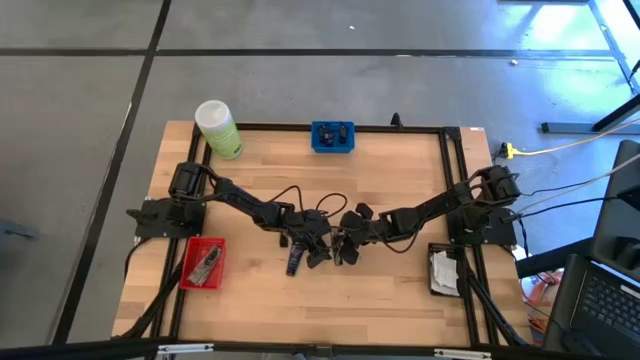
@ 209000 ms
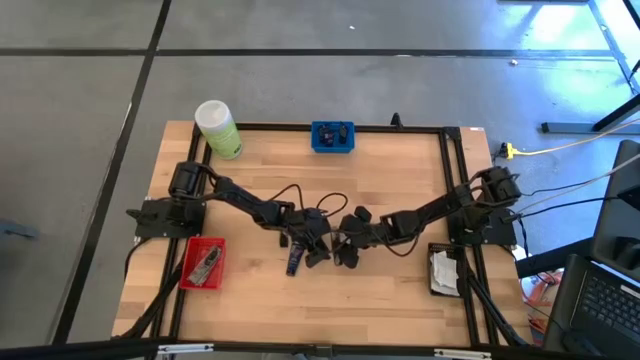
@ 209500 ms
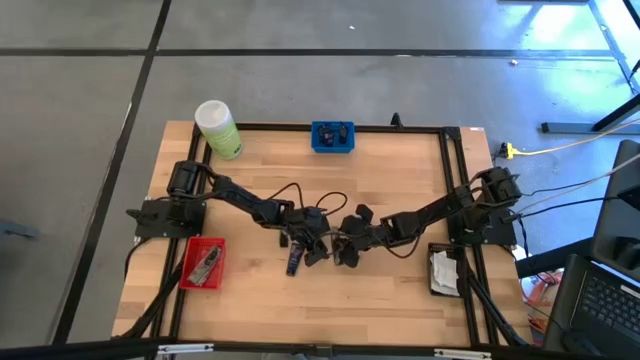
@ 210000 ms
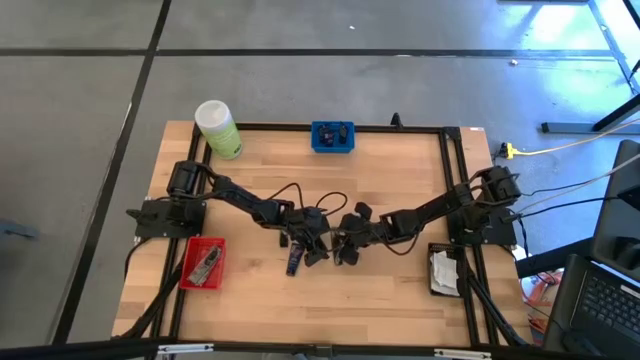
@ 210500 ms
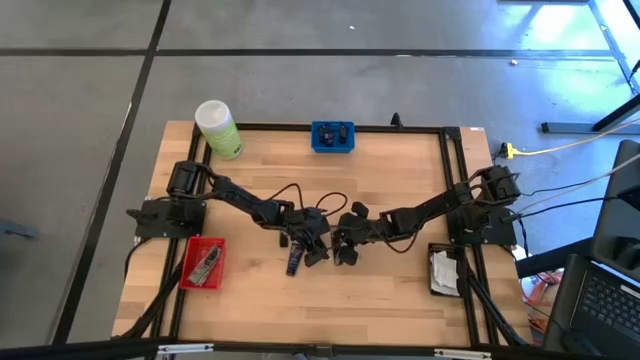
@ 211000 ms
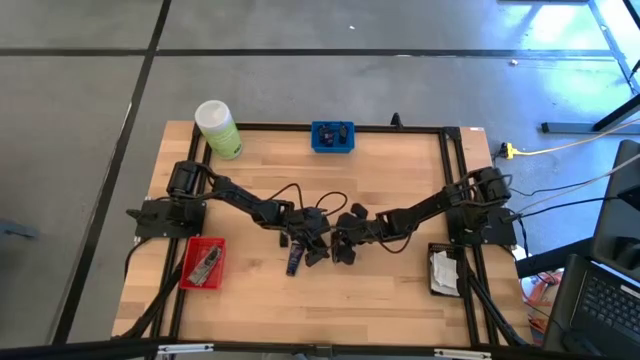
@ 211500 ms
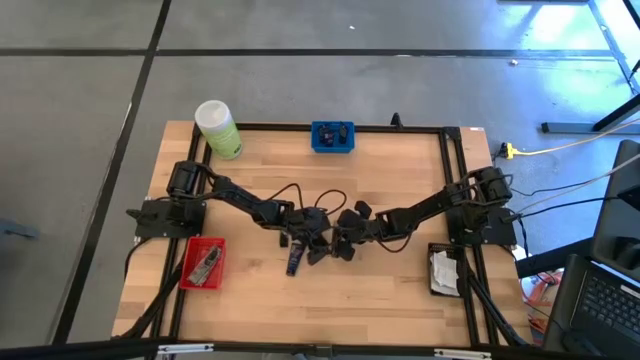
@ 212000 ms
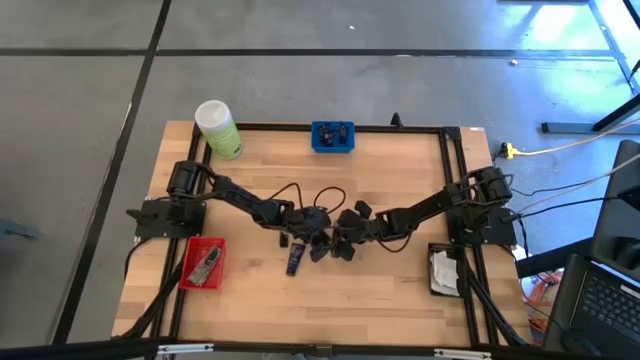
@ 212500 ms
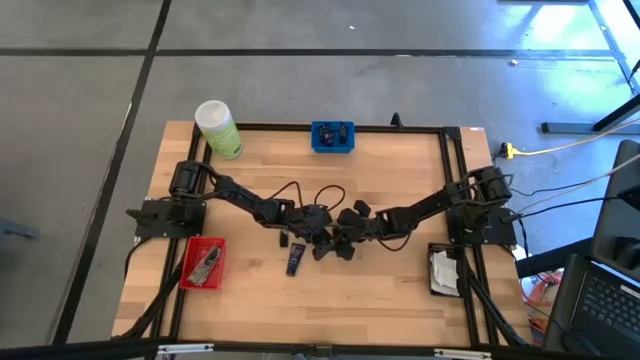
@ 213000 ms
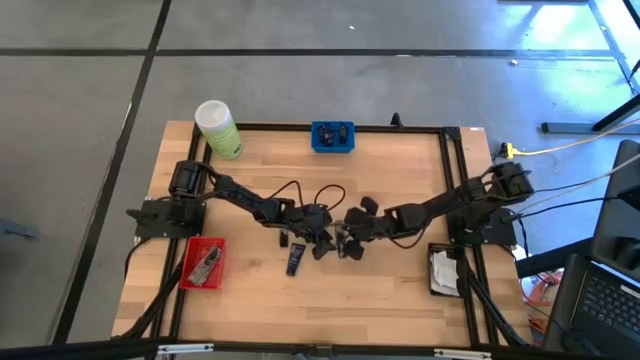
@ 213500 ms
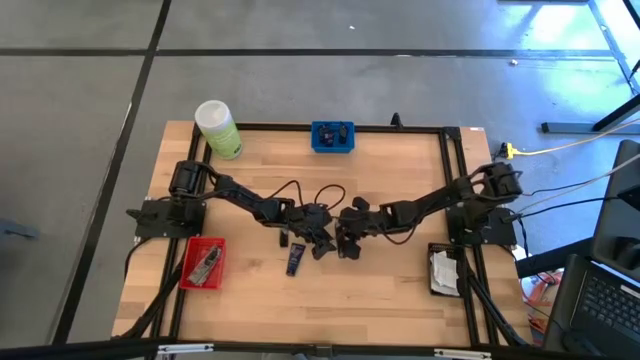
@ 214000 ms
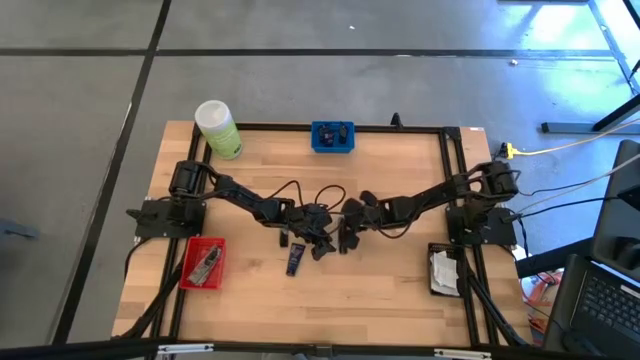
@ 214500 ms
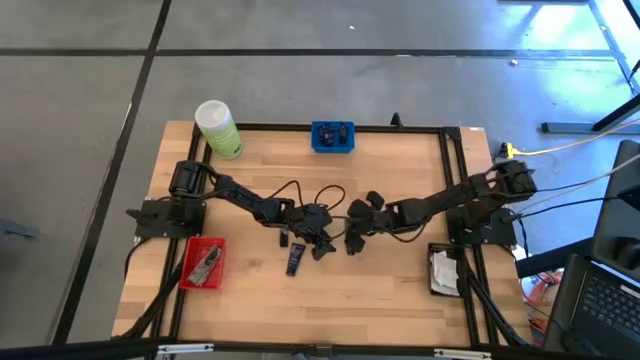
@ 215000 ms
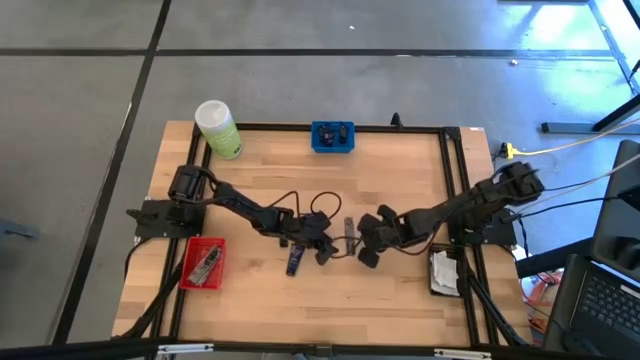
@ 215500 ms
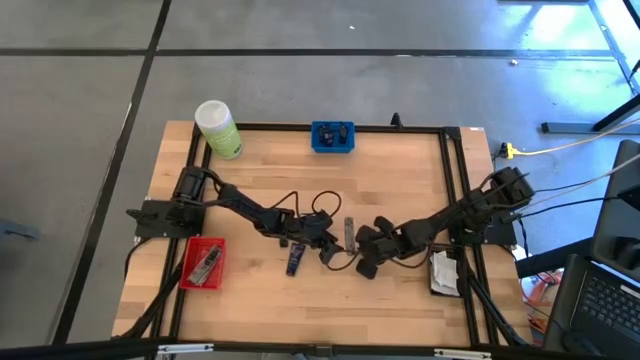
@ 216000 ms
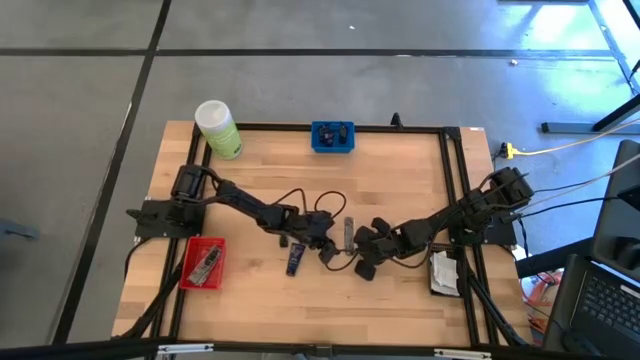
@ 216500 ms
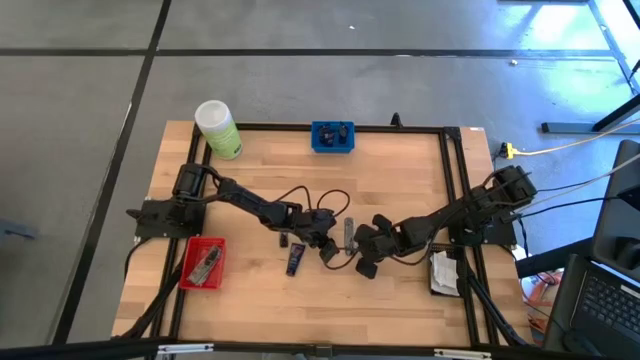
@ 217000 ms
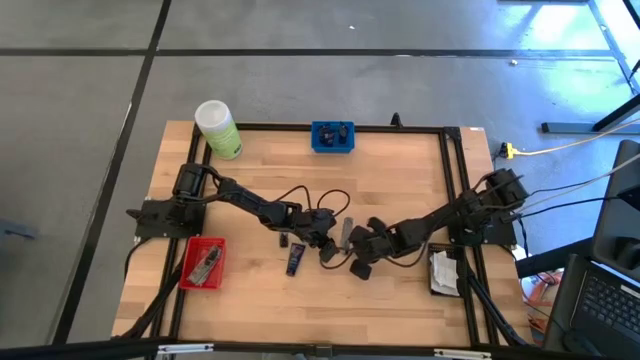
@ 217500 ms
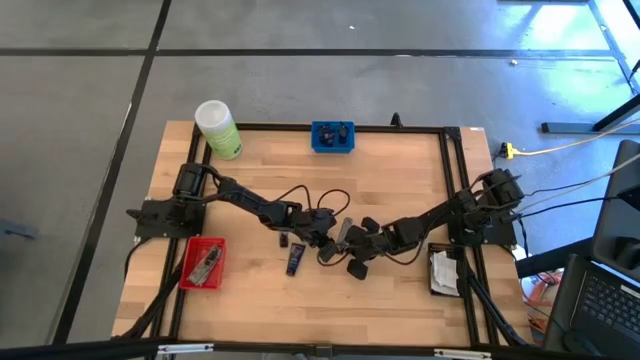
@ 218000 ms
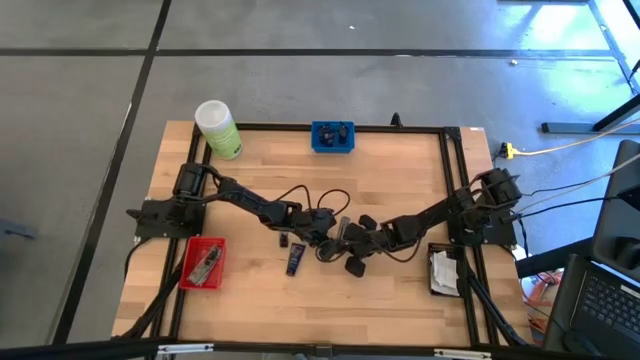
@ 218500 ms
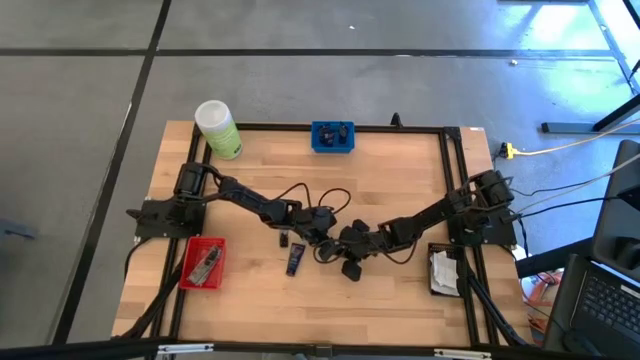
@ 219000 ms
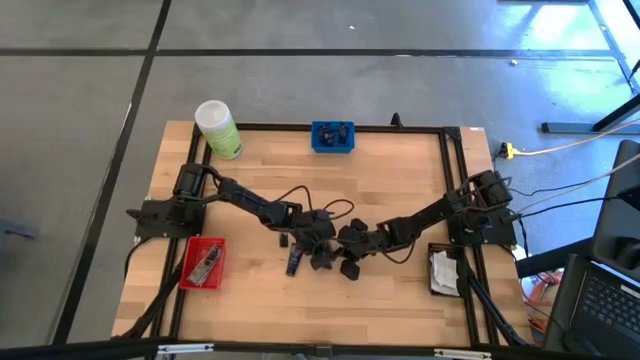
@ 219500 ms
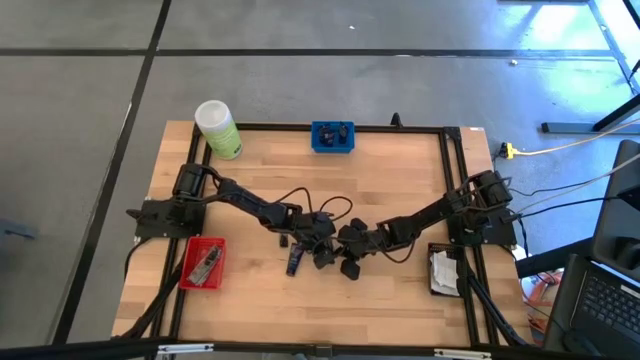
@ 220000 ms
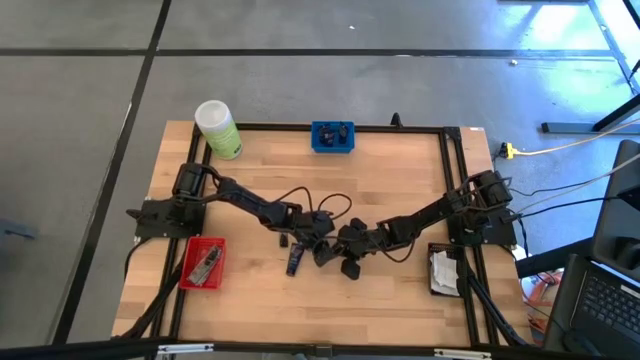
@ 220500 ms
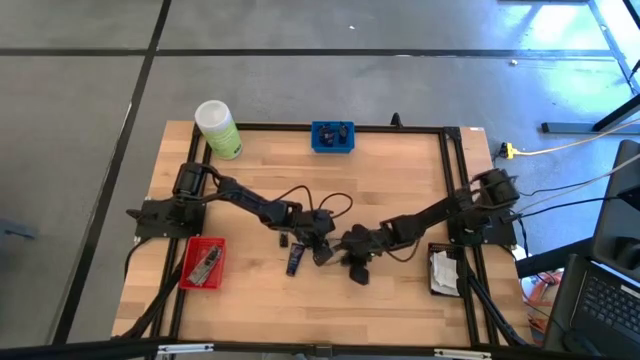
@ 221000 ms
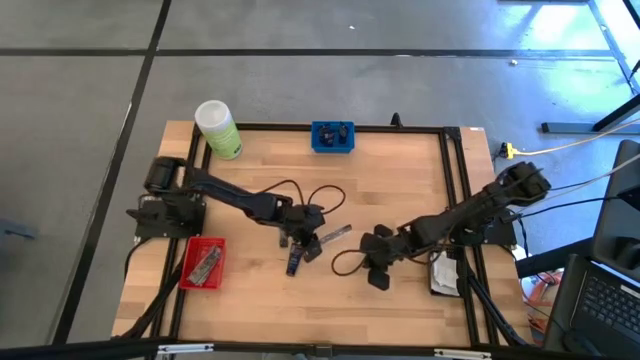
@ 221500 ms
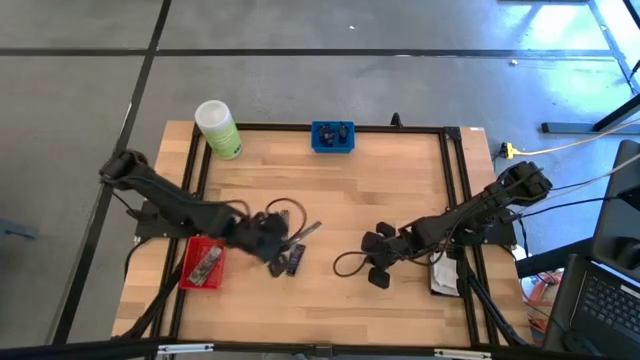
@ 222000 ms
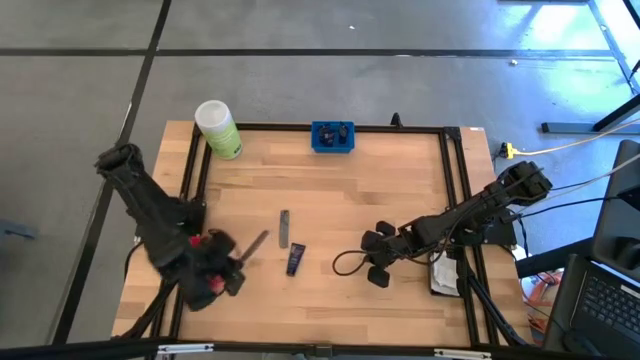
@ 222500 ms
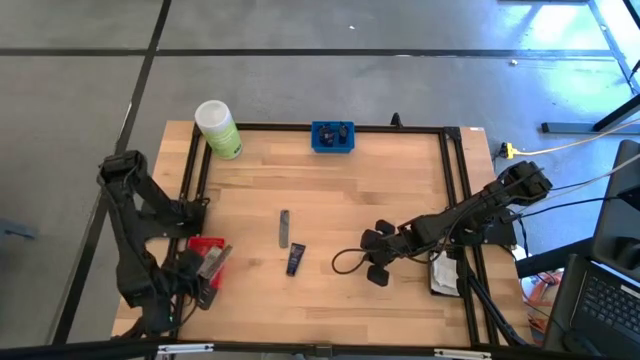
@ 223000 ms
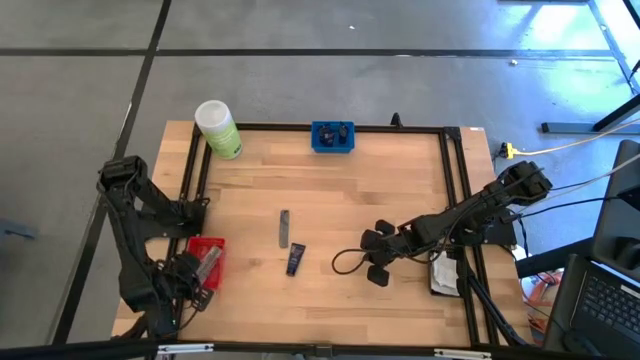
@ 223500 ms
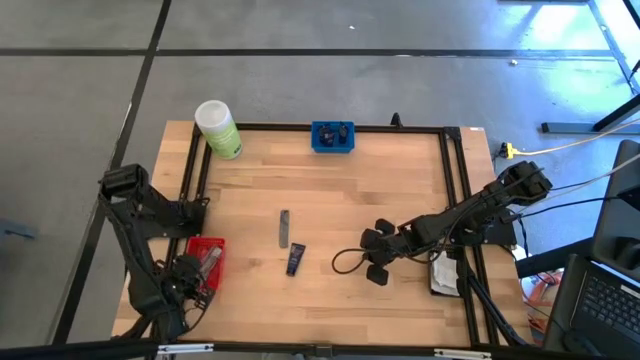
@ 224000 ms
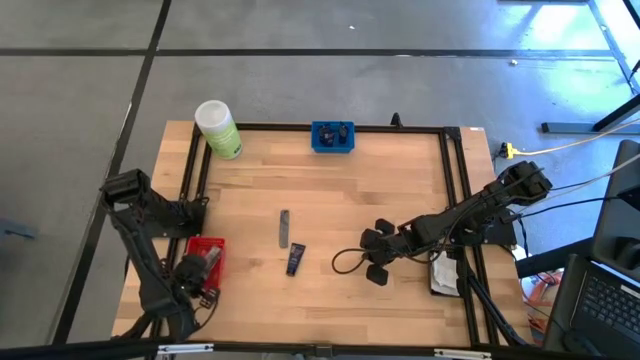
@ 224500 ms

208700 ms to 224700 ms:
Task: Pick & Place Travel size toiletries
Put the black hair comb into the red basket
